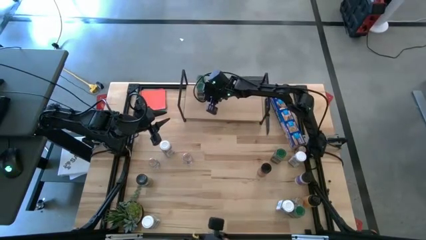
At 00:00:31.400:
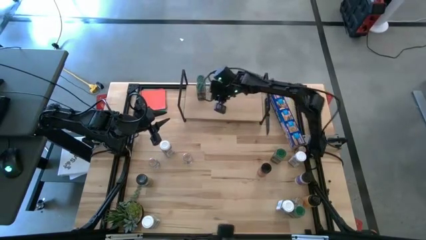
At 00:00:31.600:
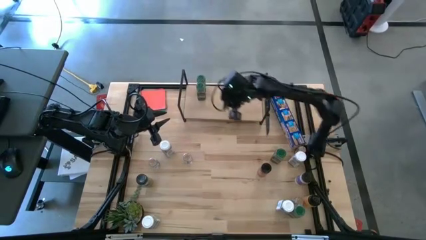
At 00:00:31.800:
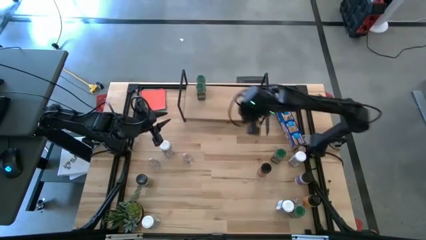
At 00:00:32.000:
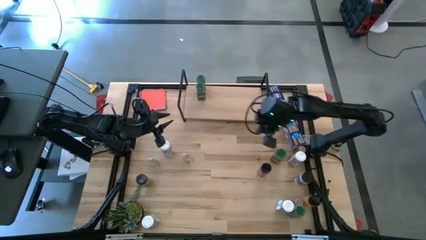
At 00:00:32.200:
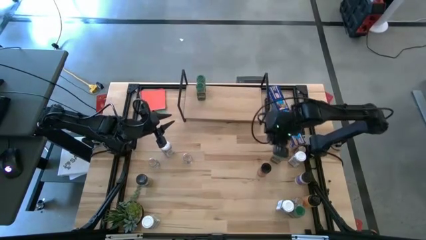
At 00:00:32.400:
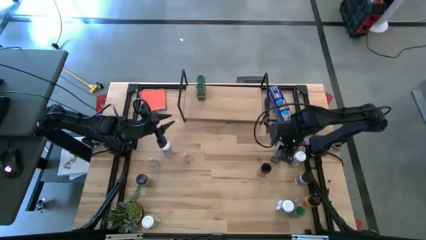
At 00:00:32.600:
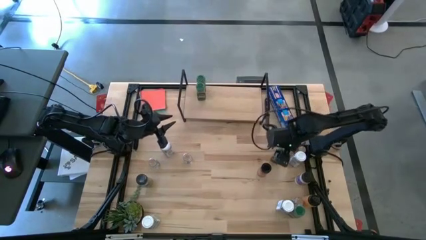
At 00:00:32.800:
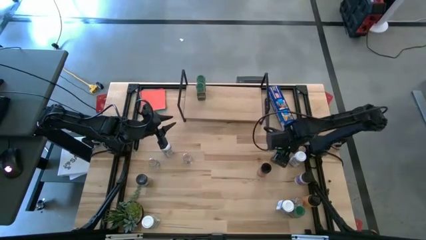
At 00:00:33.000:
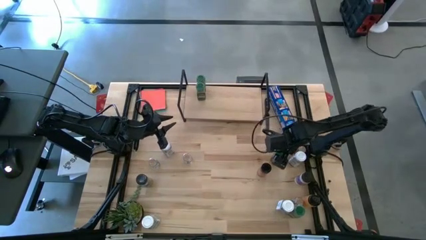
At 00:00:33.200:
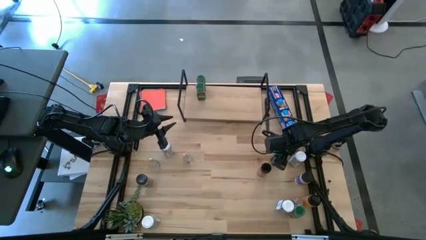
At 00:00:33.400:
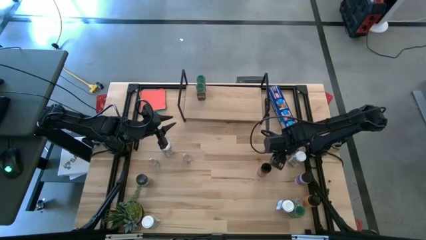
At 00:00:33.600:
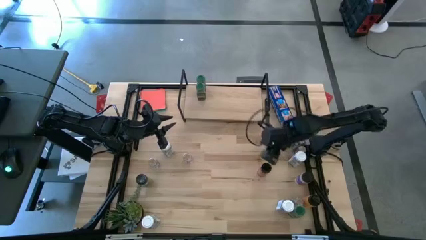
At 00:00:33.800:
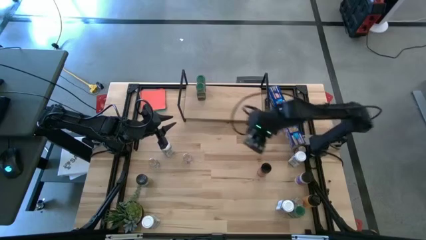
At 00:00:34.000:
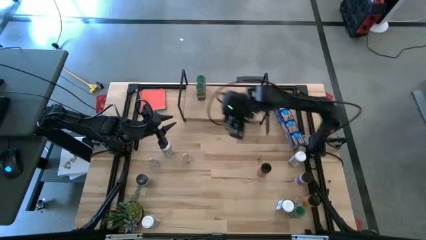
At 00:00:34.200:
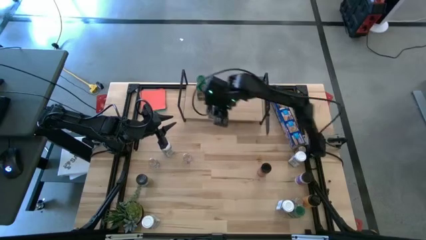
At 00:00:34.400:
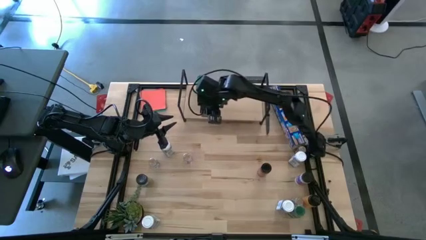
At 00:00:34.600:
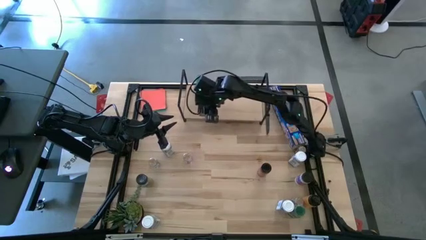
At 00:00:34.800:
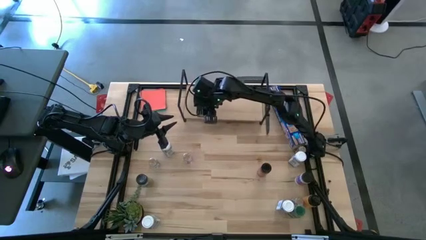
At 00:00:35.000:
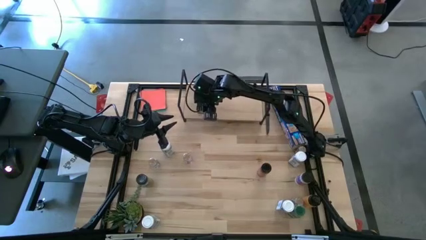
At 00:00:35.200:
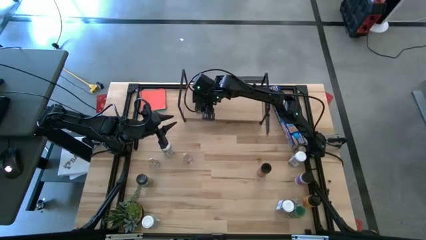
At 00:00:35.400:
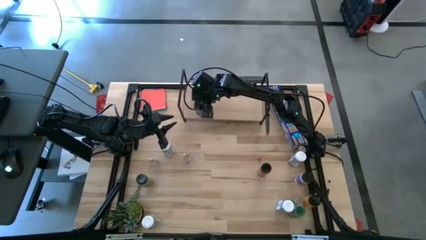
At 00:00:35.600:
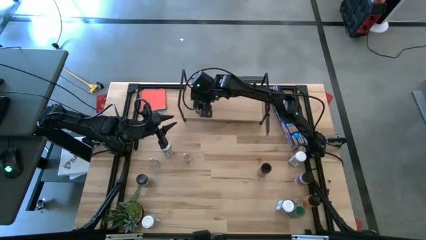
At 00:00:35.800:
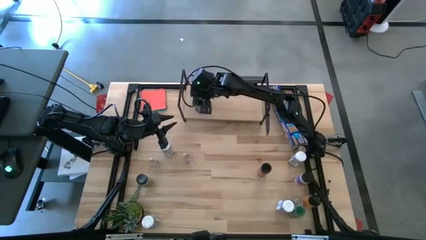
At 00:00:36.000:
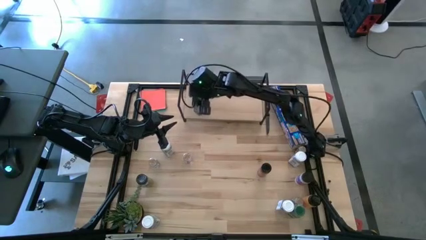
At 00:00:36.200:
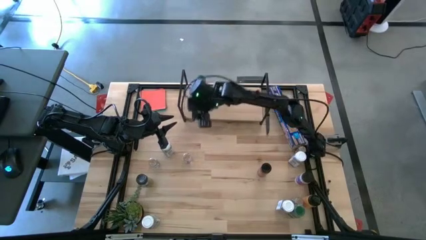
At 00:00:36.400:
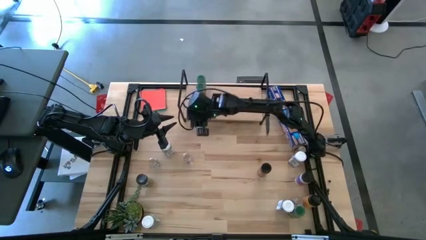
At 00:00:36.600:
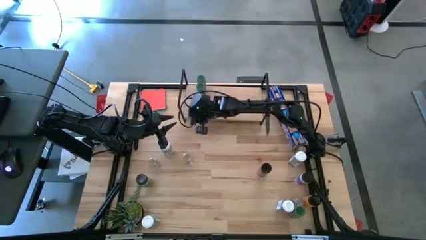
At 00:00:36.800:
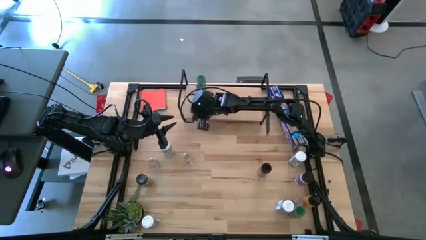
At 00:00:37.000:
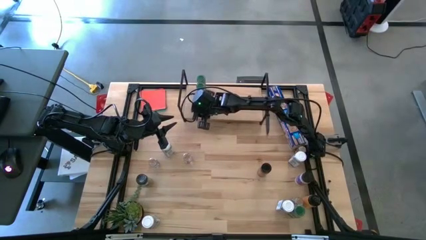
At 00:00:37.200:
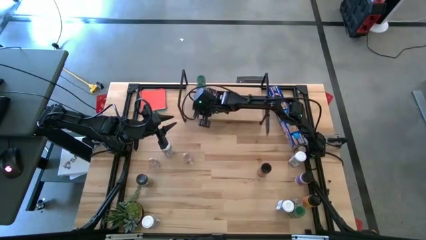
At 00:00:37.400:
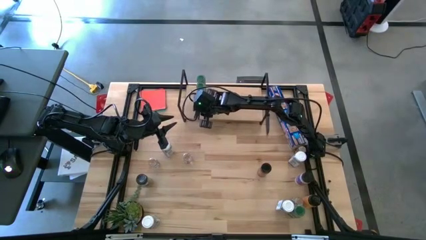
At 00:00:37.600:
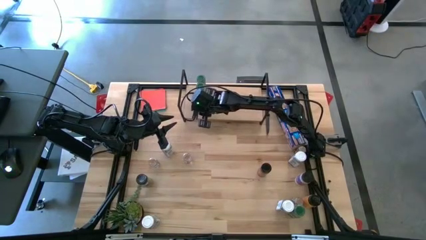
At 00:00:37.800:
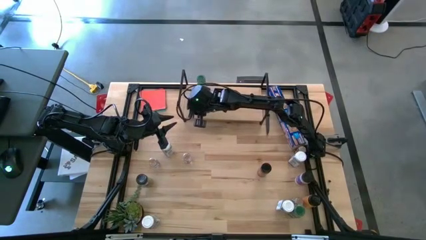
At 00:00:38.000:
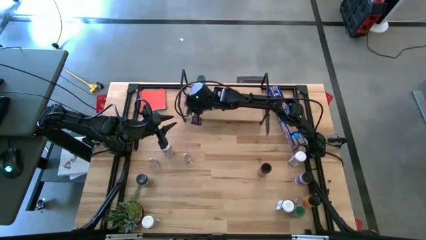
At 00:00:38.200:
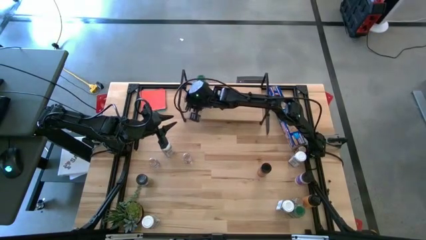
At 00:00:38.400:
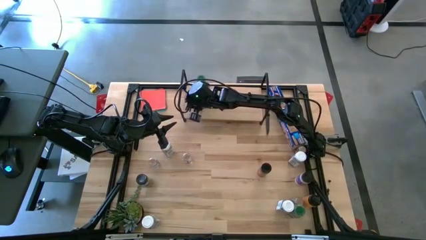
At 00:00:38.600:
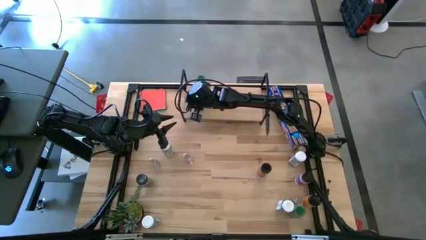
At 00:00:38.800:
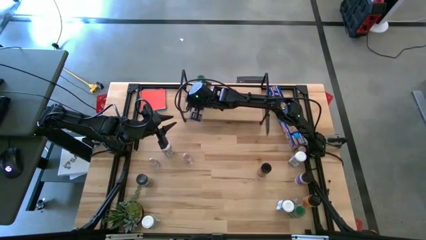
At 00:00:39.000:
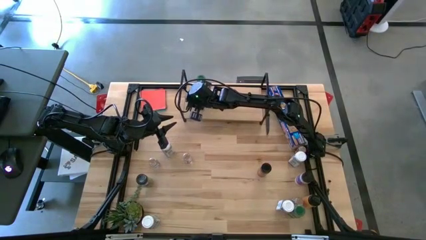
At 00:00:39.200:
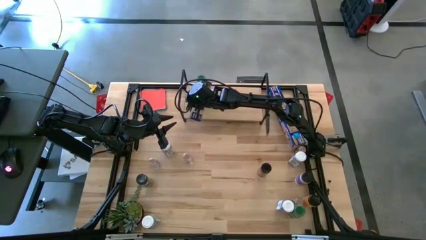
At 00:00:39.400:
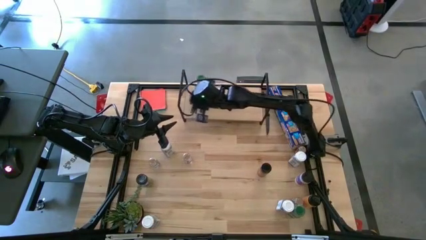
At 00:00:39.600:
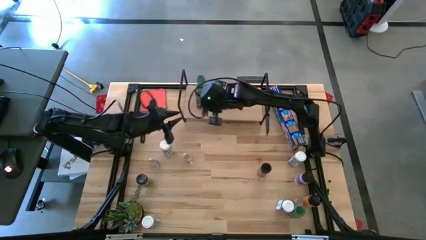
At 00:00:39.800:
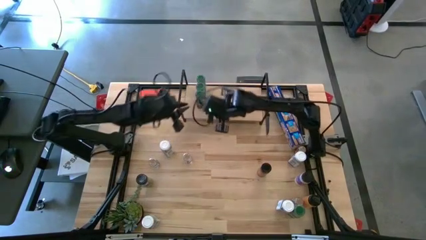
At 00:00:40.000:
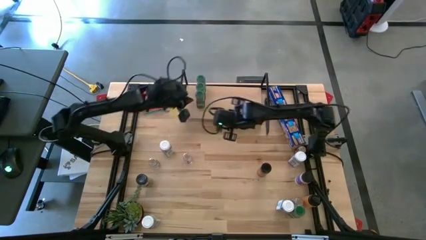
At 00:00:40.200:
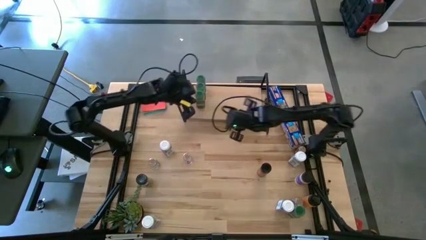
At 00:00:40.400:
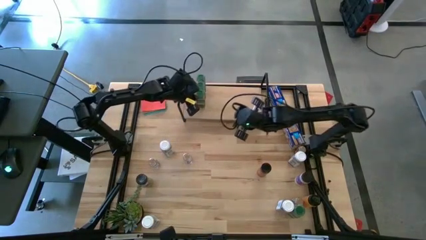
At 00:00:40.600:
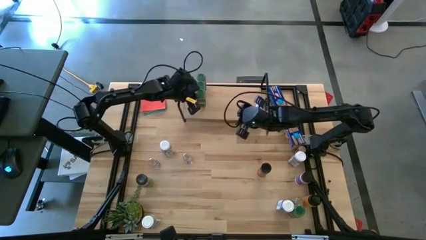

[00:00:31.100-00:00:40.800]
Task: Shelf spices
Put the top green seasoning bottle on the shelf aligned with the other green seasoning bottles
